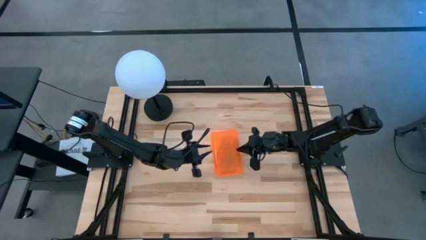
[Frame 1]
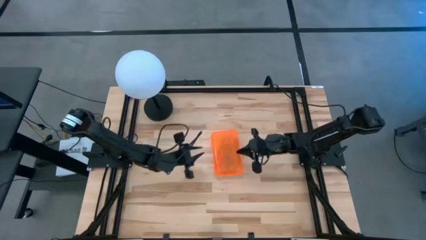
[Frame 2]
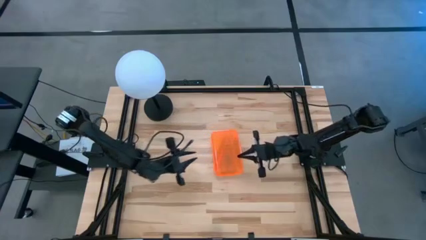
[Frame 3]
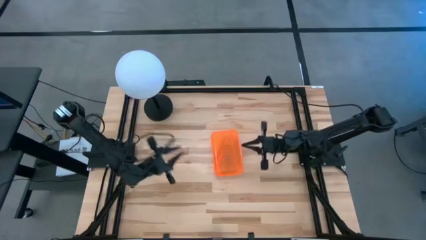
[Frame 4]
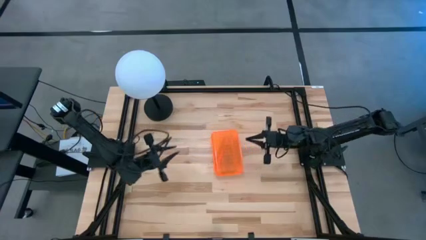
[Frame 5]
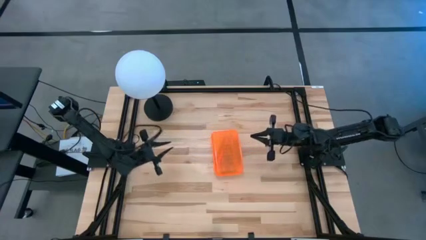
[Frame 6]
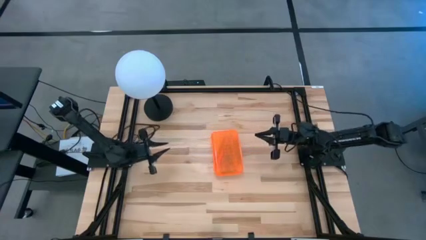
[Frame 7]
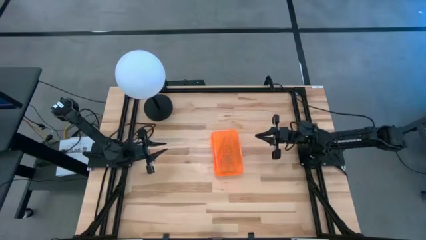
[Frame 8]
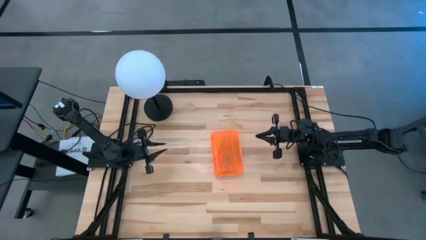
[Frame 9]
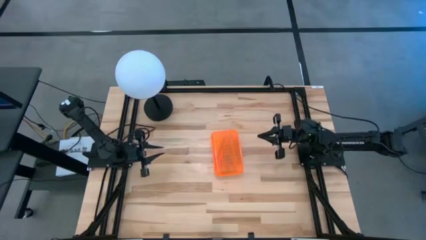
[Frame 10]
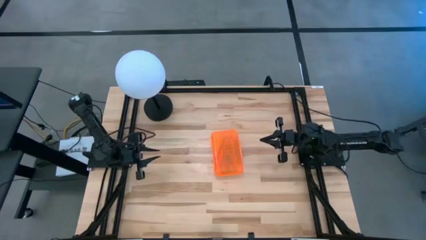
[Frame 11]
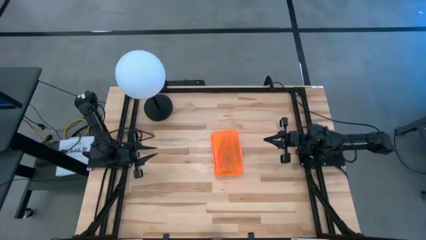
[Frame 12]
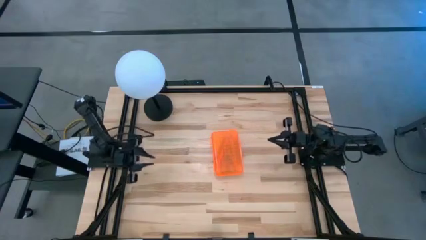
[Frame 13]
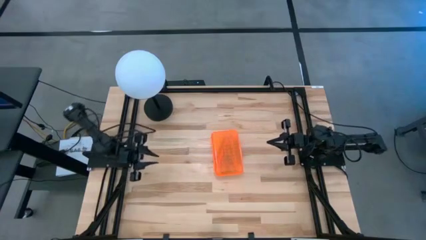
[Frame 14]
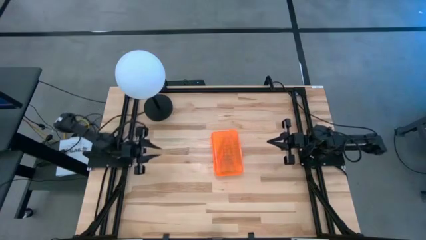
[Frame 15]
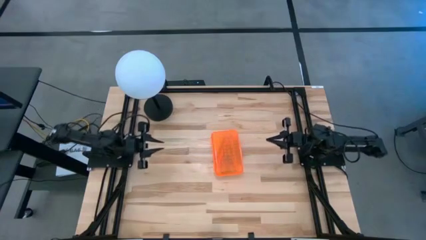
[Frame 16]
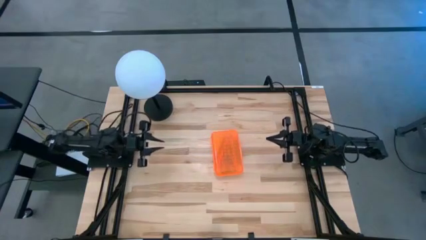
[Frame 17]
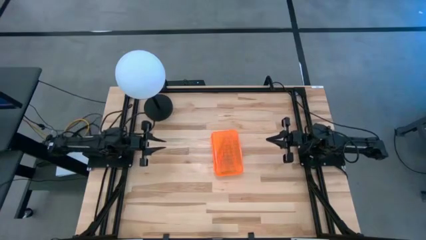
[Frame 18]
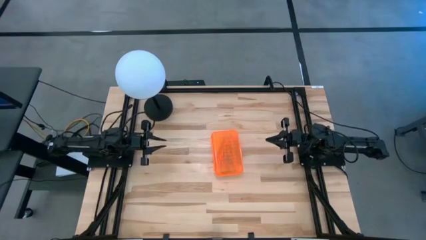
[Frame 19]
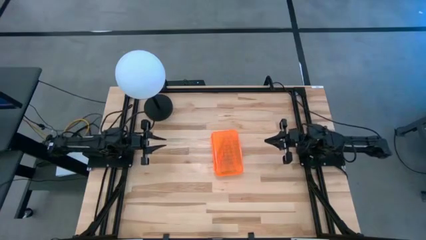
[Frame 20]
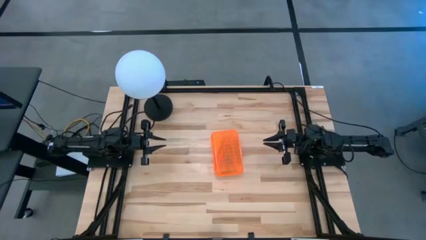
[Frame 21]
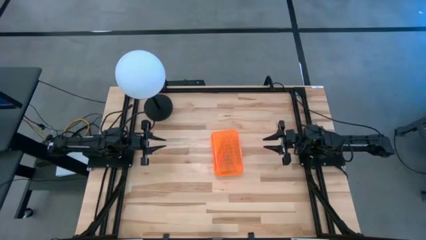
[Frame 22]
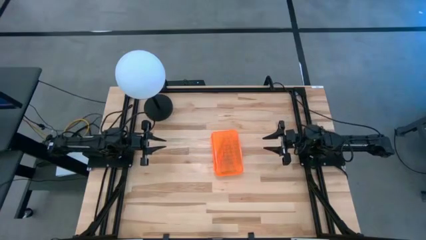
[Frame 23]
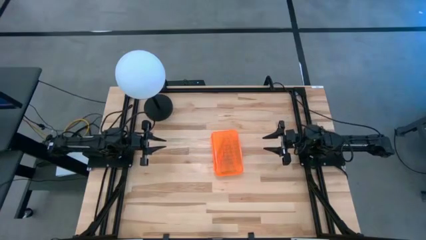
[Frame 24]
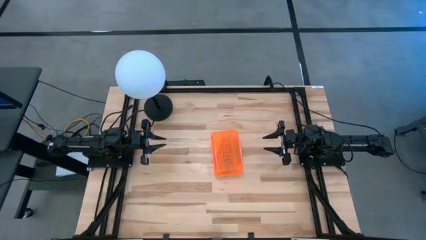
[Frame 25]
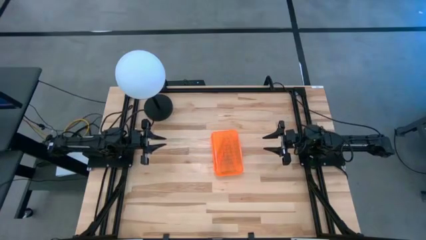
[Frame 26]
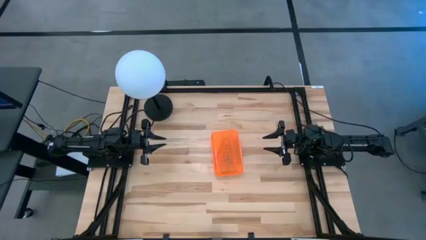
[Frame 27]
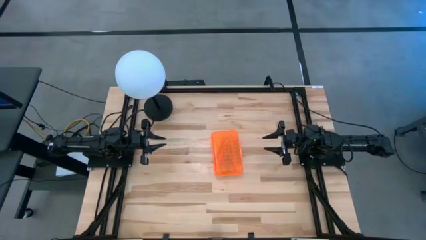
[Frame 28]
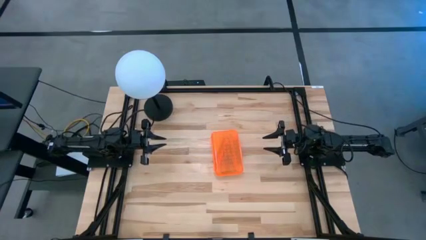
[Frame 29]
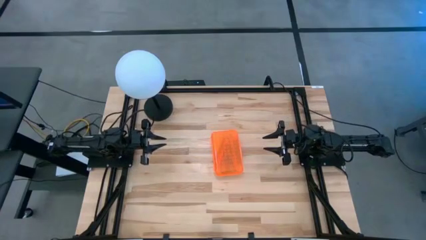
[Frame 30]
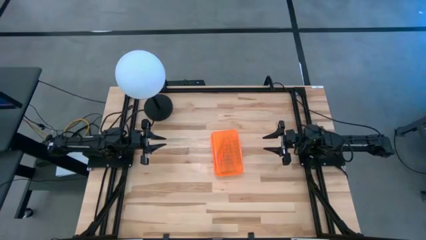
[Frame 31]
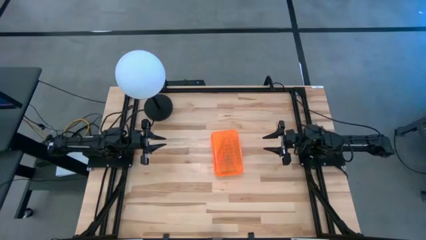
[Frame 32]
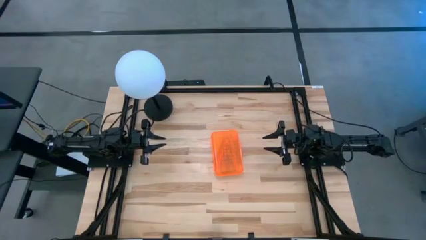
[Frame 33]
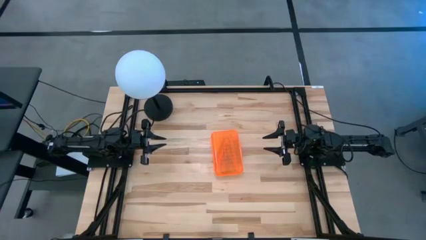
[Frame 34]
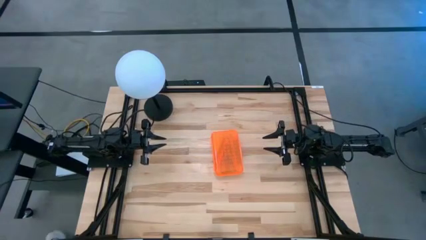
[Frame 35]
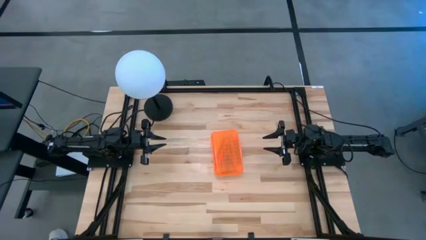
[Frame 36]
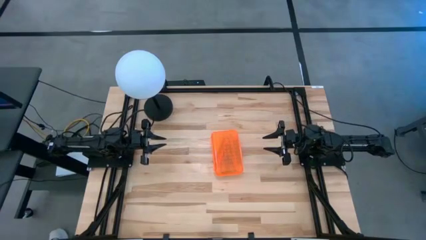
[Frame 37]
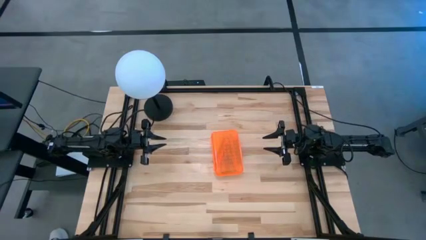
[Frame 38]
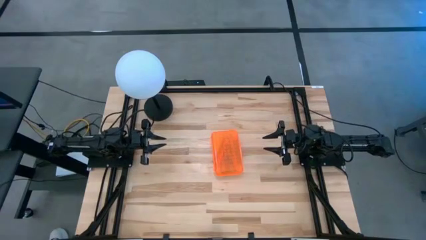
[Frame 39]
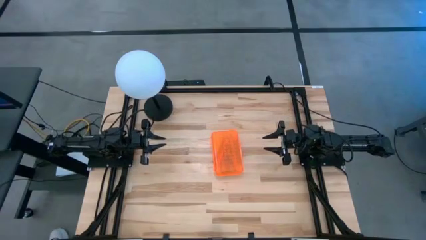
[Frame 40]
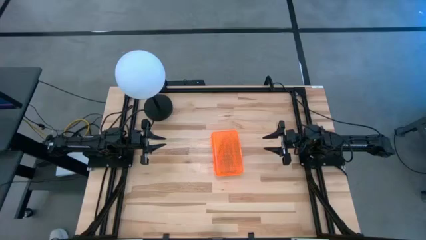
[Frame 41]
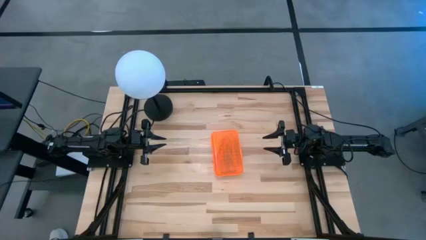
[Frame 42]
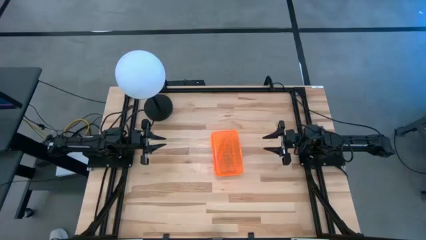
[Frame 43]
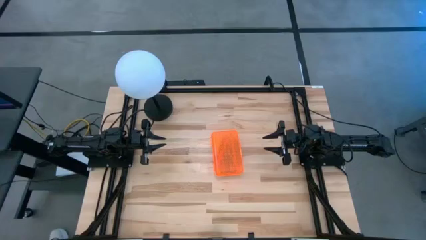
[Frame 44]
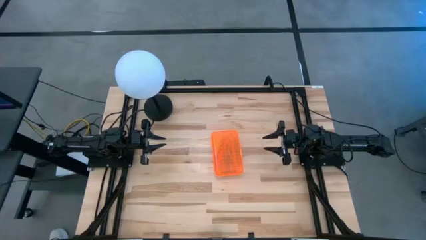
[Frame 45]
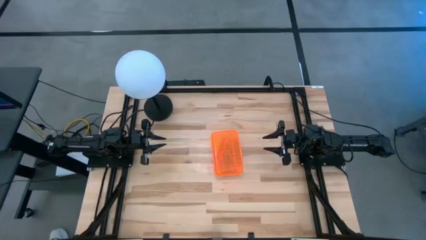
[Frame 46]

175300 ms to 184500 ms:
Task: Pick & place school supplies into a supply box
Return to Home Position

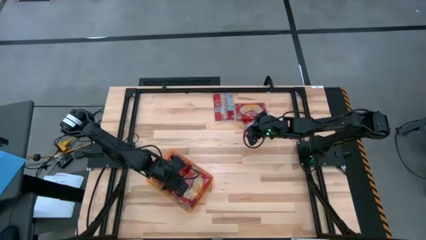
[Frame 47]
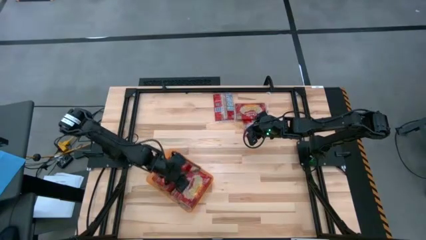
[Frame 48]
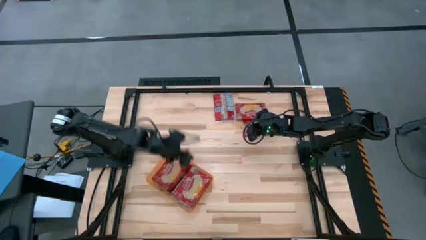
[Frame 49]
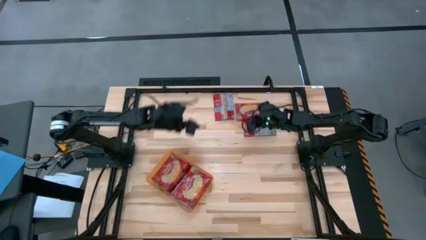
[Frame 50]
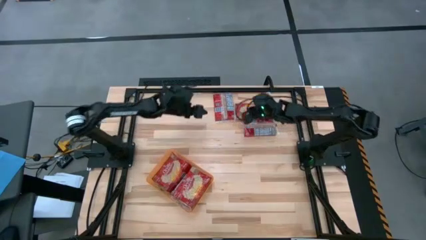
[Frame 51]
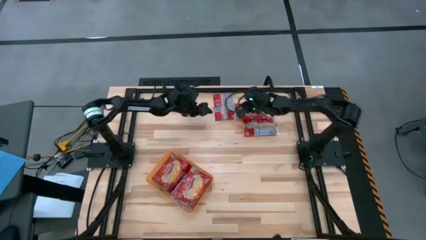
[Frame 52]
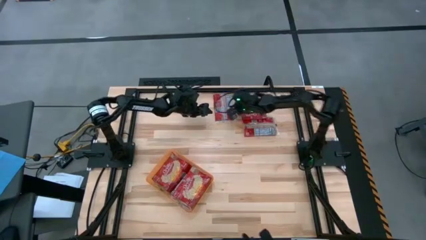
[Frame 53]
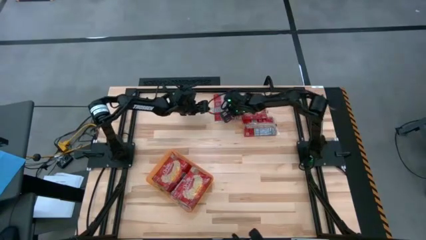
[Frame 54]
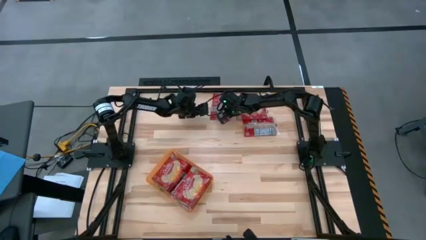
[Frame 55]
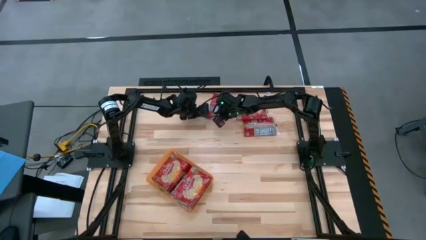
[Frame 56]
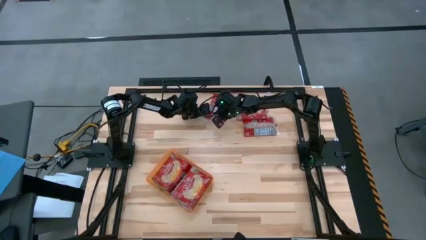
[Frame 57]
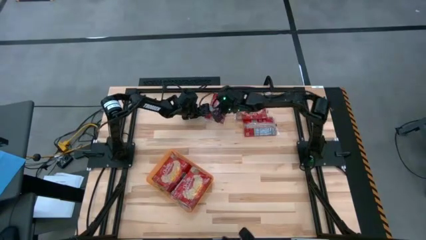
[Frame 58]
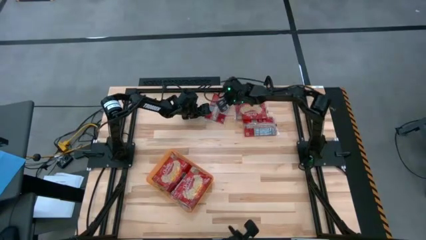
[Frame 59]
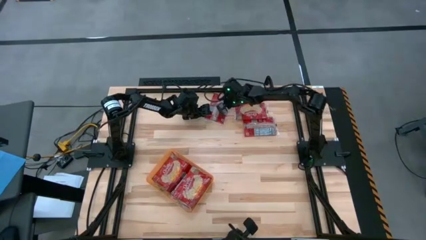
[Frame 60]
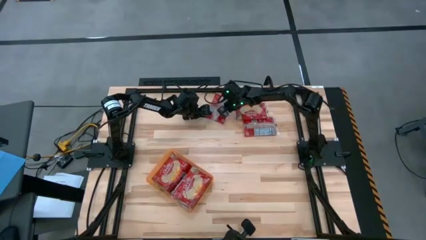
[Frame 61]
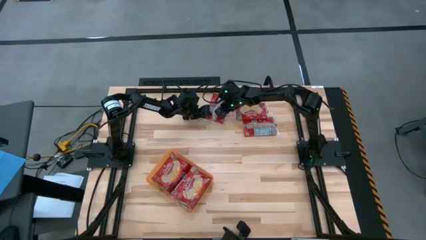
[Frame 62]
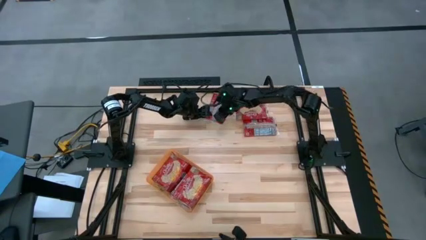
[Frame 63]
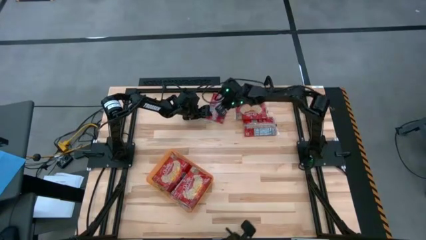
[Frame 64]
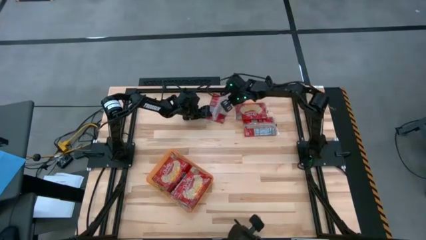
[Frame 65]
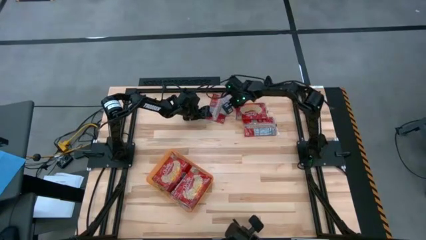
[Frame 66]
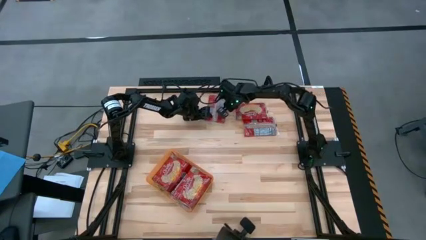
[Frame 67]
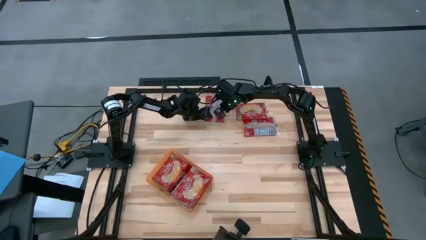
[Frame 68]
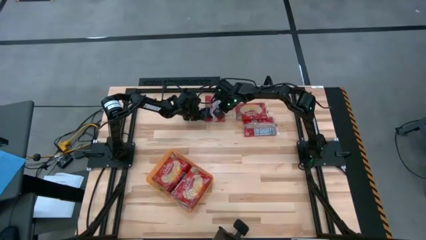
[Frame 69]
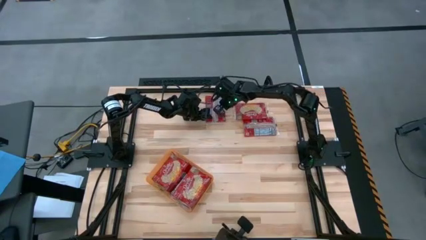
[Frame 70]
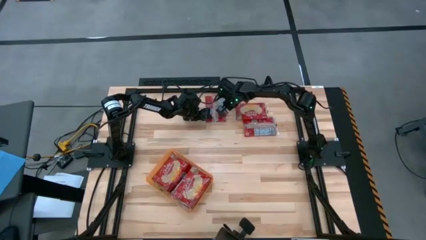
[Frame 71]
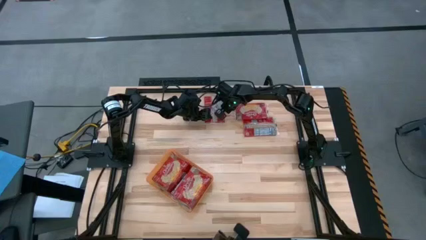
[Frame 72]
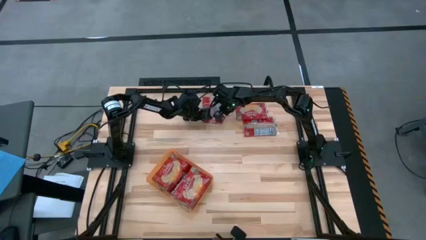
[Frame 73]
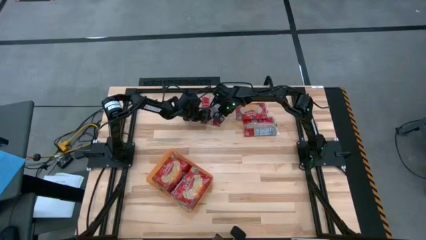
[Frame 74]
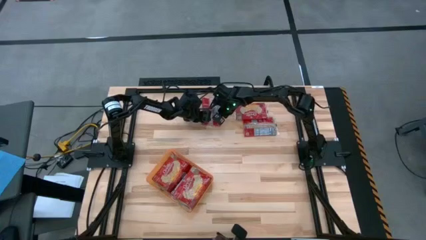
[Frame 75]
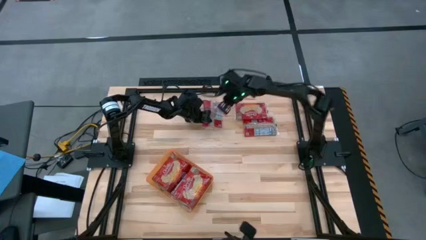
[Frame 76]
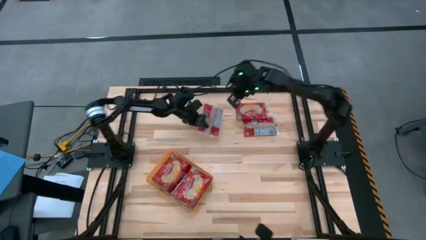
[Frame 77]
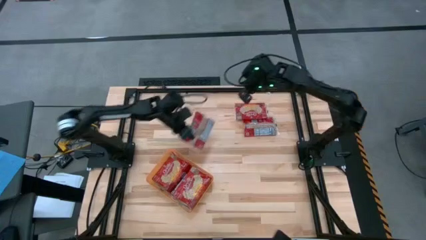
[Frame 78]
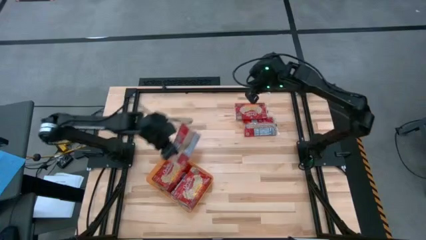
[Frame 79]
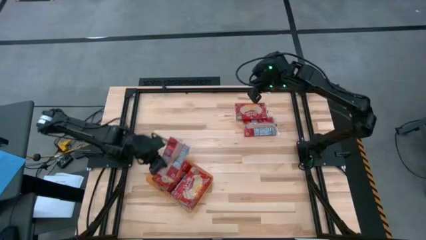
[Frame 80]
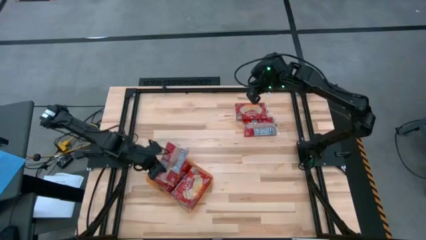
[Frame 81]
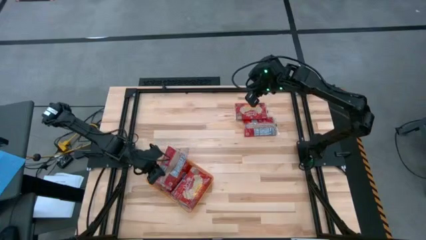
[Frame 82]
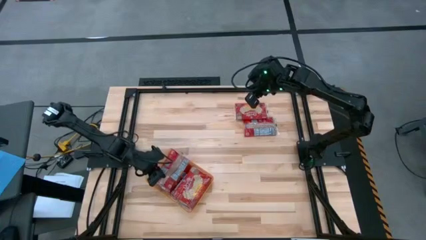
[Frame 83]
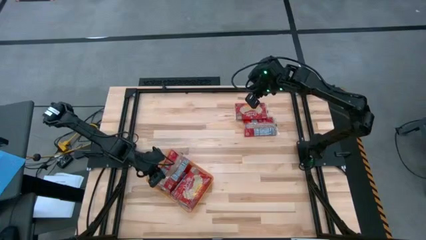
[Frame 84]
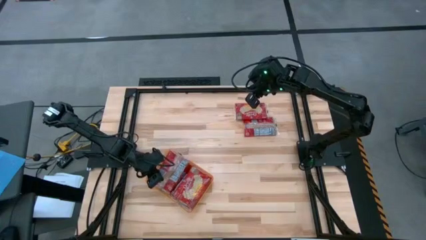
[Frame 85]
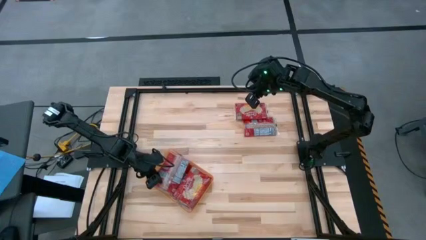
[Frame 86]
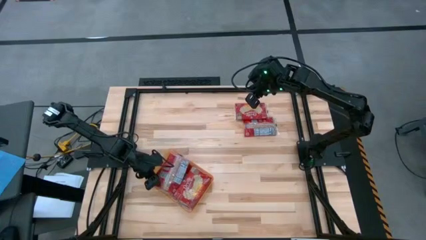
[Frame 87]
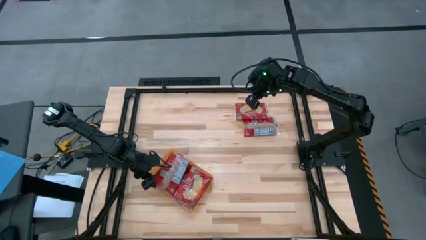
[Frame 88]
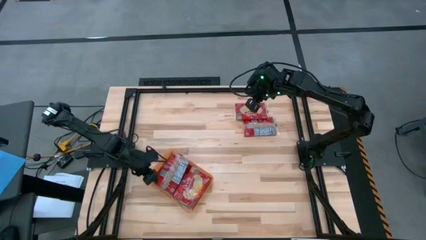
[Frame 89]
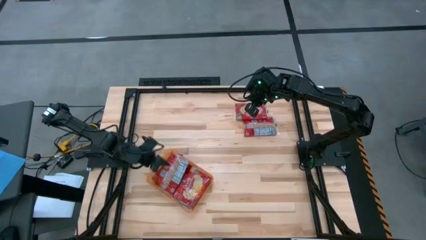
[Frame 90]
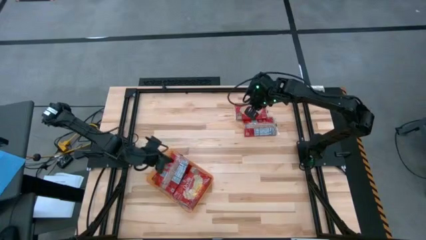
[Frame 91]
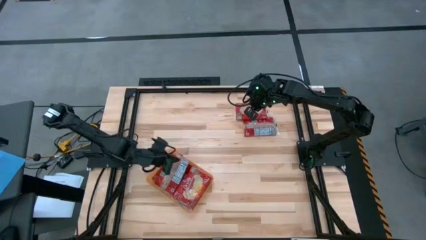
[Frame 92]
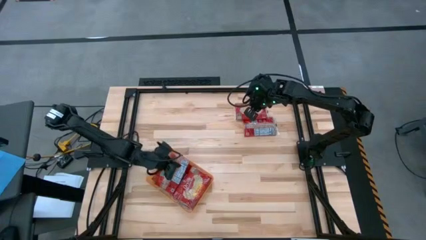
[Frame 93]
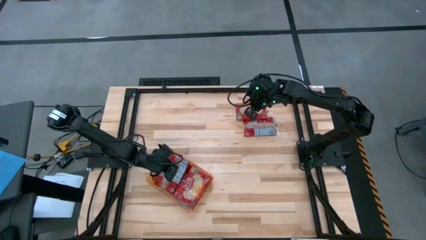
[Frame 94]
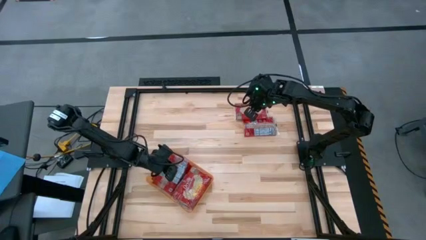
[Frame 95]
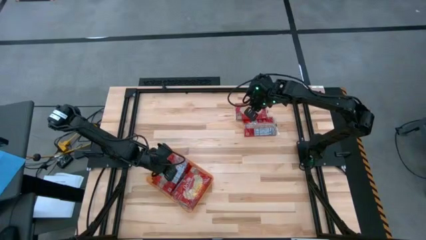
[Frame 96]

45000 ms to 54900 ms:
Task: Sort popcorn bags into baskets
Put the popcorn bag into the orange bin
